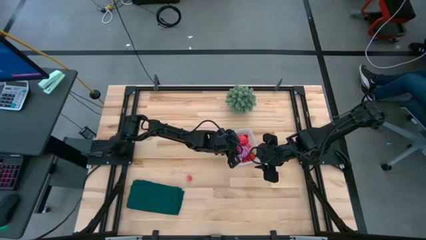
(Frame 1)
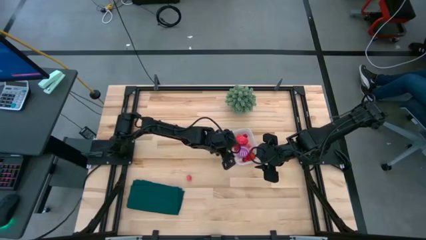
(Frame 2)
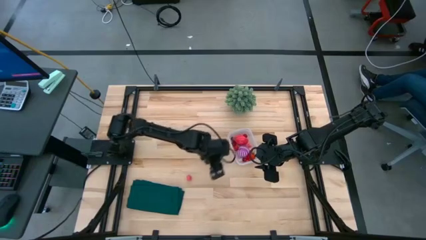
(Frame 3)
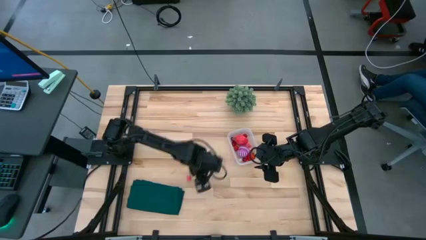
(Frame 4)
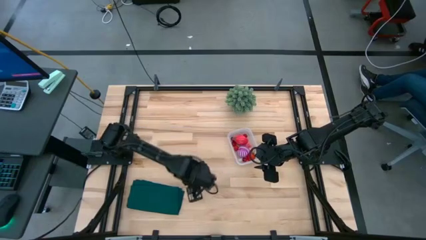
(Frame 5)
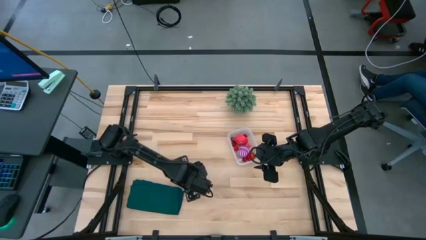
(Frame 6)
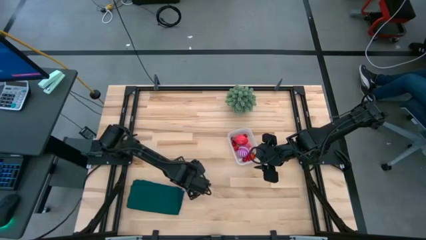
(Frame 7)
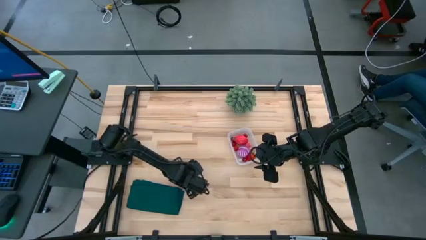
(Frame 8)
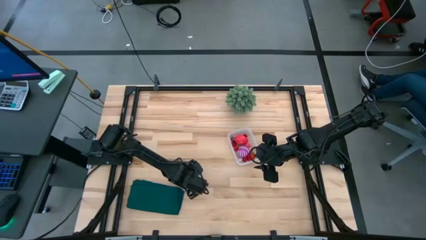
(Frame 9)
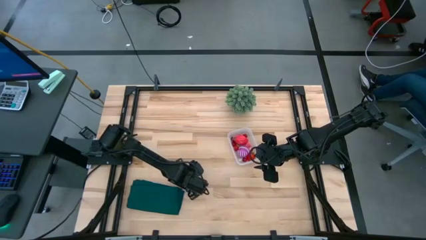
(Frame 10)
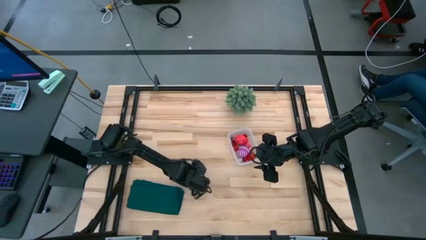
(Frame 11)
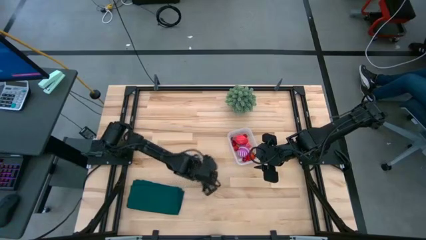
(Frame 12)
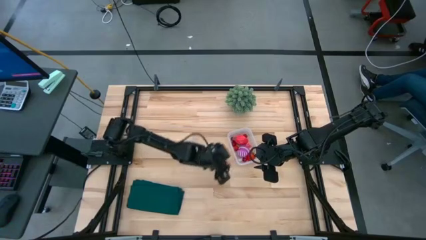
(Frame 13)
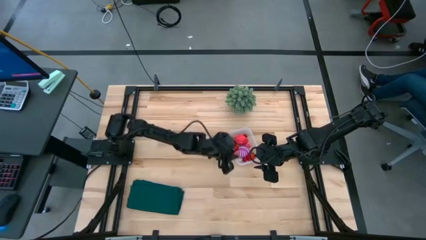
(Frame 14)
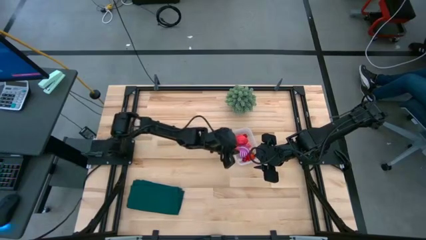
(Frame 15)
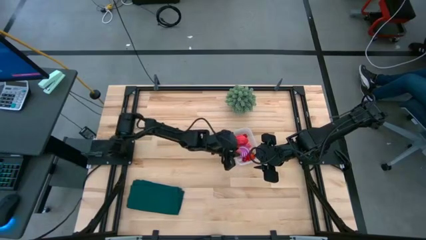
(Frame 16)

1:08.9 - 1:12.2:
Task: Pick and placing Produce into tupperware
Put the pink peach into the transparent bin

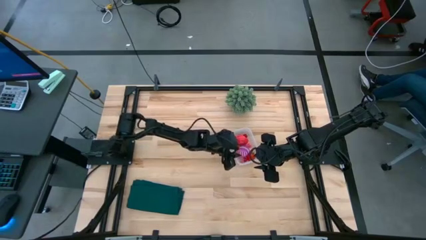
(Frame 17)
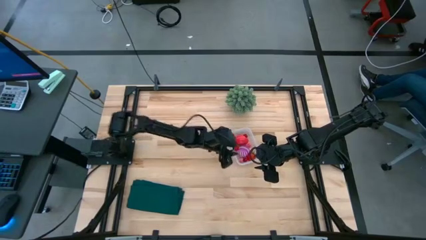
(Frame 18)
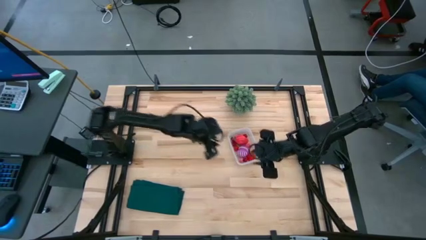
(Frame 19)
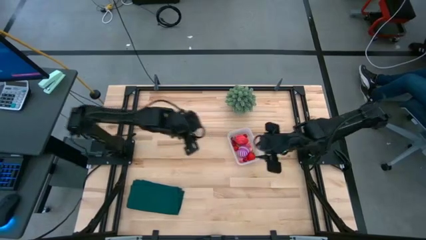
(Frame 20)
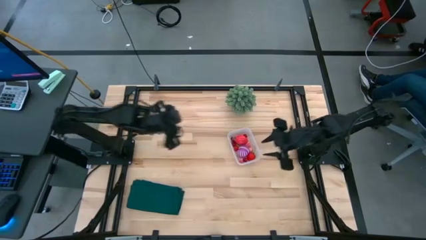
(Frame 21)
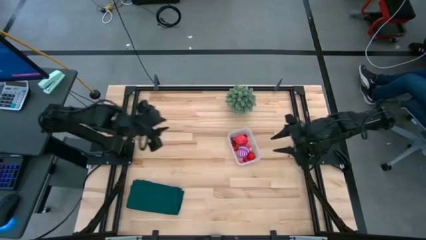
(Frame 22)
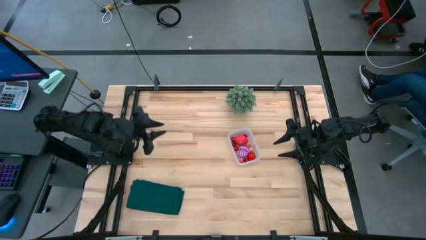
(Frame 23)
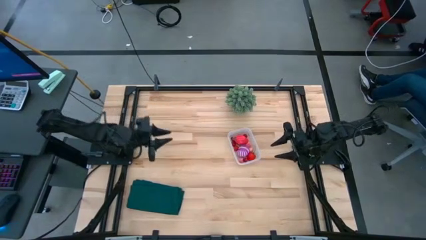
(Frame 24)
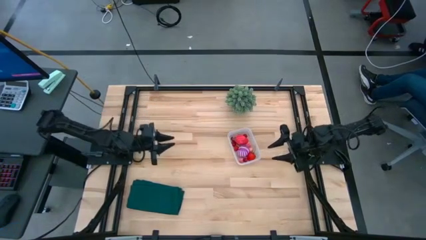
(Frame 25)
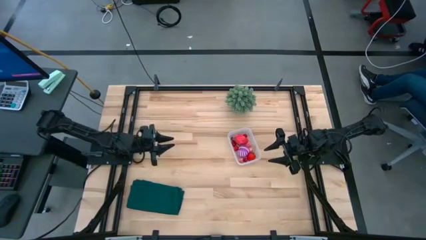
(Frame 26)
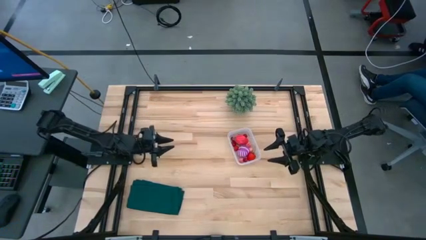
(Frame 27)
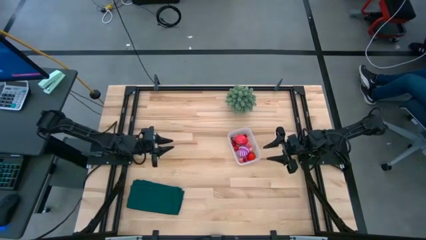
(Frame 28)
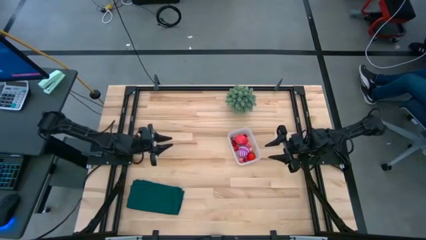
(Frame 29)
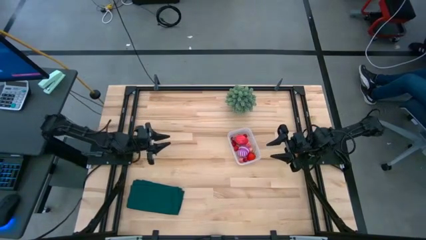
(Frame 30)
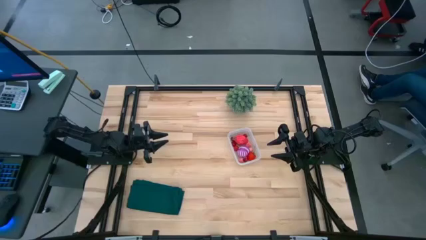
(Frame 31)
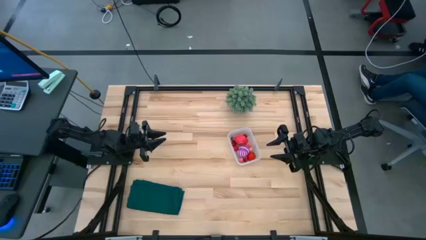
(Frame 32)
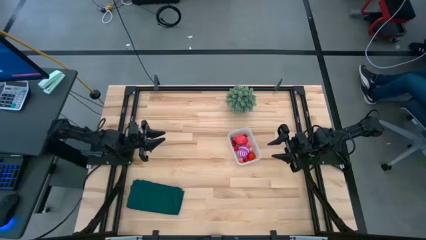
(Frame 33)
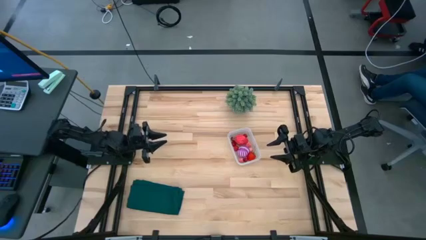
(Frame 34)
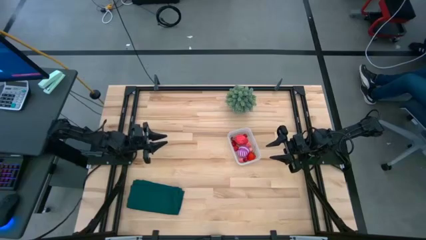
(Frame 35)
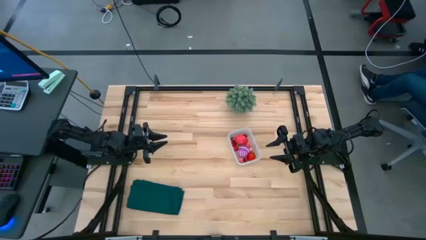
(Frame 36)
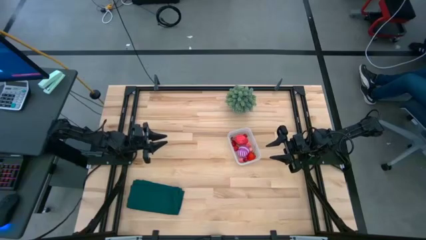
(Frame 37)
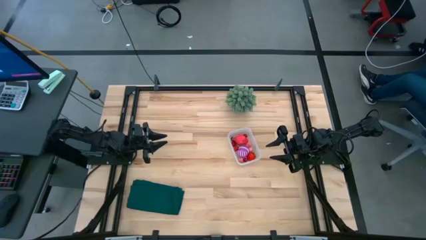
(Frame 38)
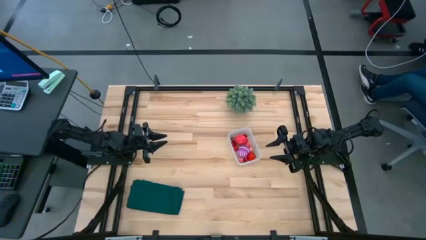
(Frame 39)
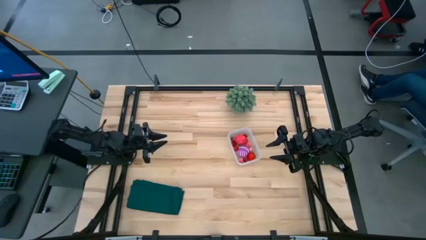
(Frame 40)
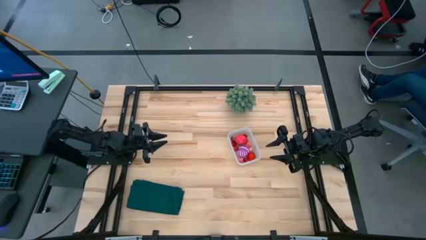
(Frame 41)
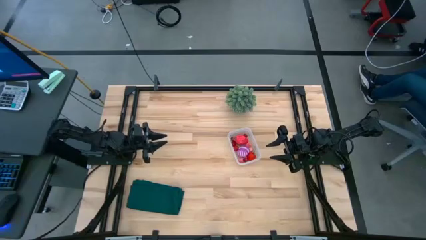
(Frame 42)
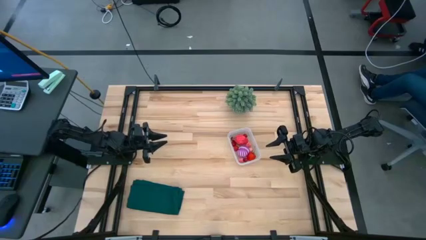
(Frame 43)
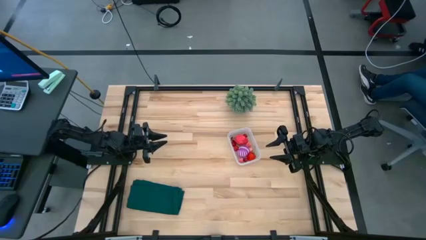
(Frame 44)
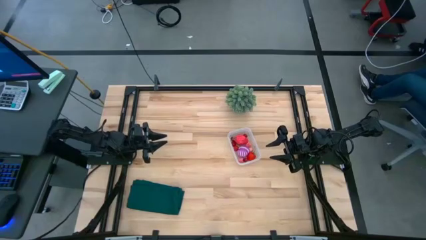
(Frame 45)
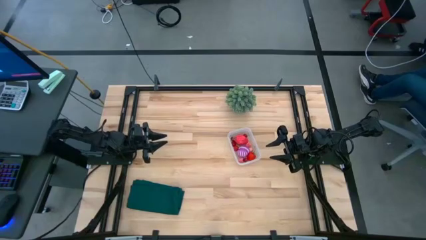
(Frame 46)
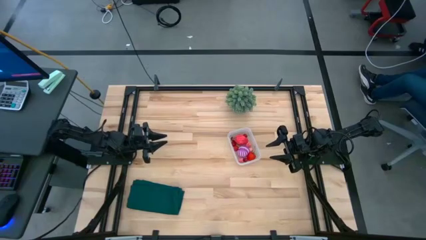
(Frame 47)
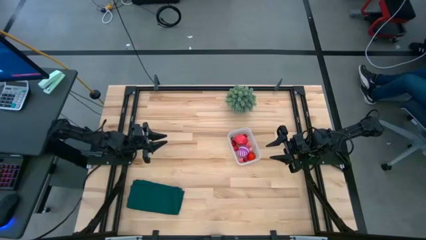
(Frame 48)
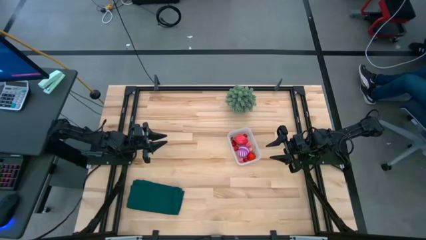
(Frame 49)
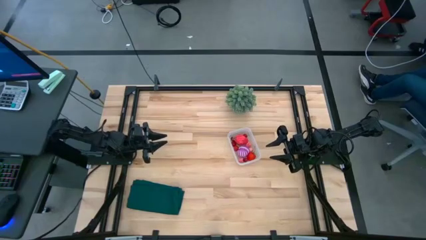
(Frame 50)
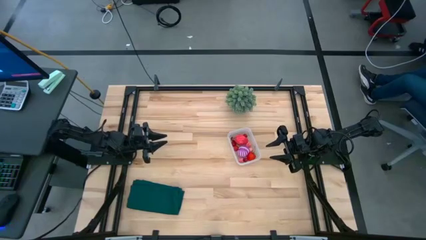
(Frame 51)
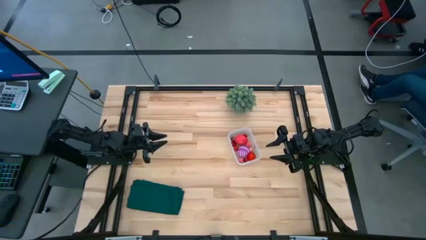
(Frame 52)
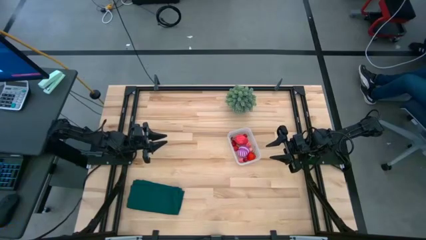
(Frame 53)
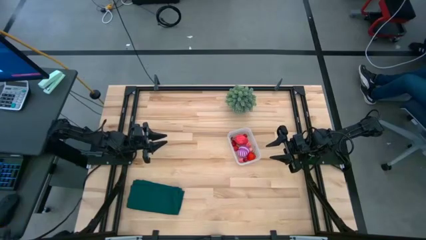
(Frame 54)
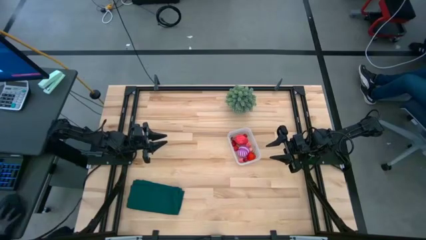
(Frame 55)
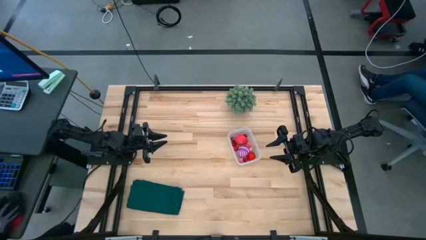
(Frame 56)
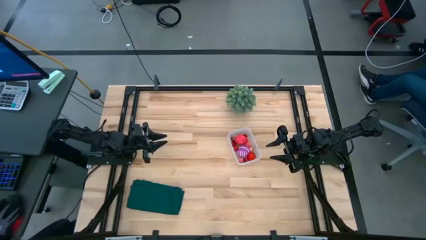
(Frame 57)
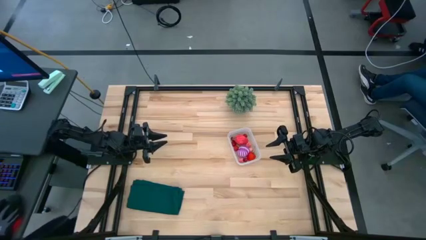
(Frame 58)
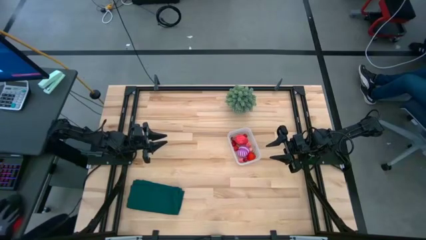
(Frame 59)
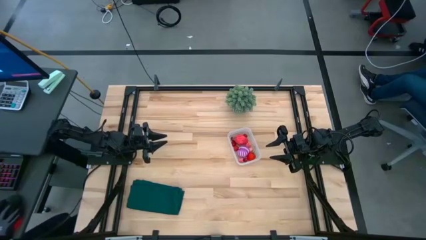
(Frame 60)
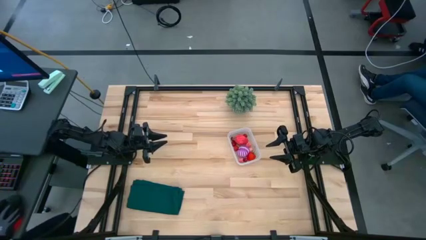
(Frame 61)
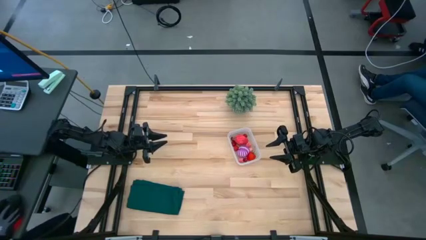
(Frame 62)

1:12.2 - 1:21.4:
Return to Home Position

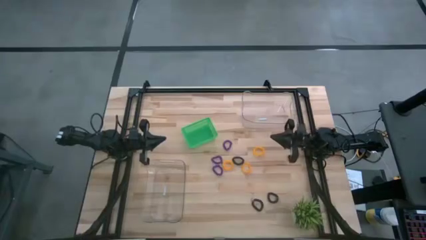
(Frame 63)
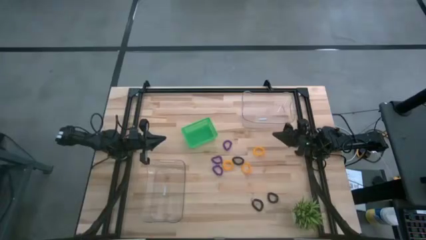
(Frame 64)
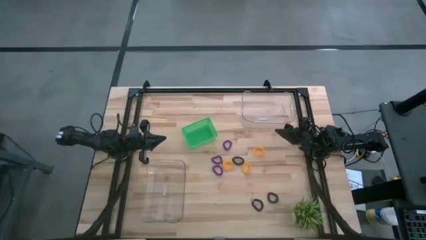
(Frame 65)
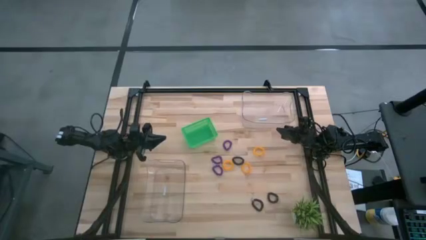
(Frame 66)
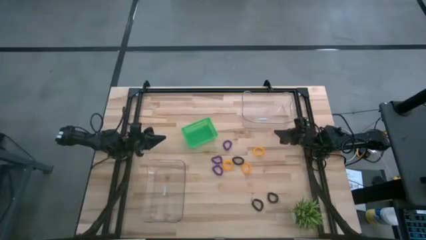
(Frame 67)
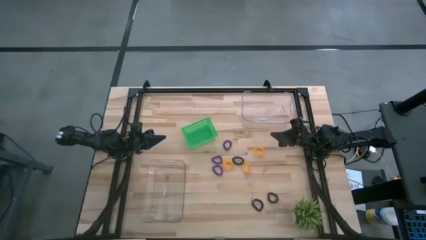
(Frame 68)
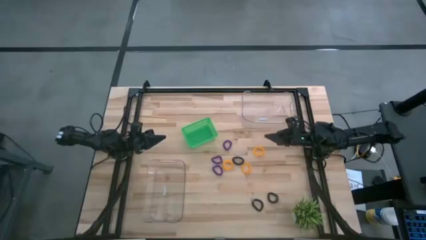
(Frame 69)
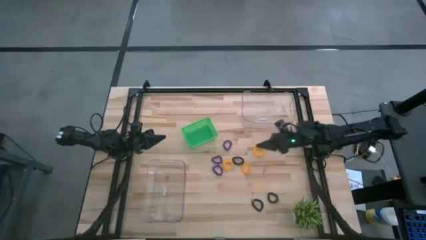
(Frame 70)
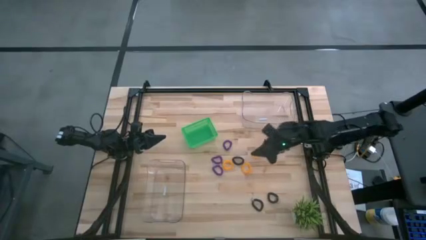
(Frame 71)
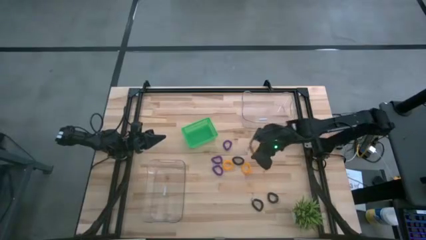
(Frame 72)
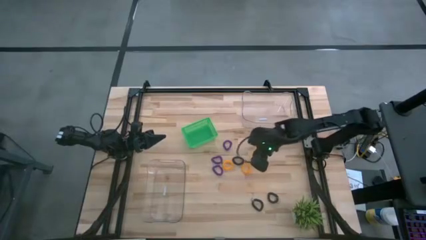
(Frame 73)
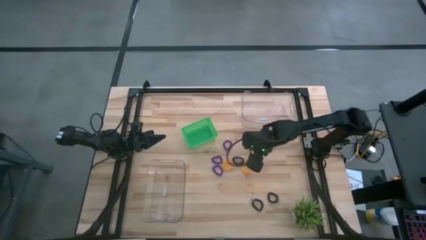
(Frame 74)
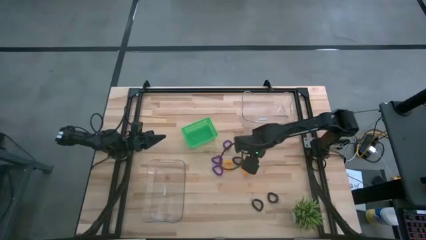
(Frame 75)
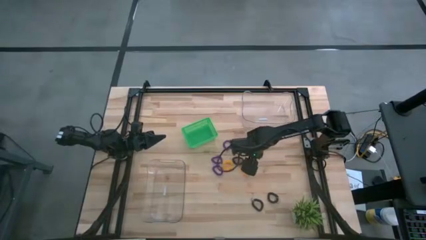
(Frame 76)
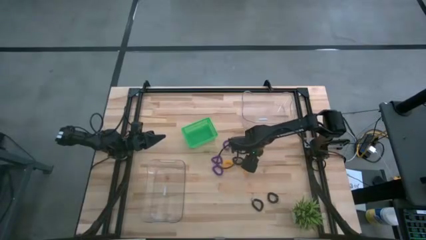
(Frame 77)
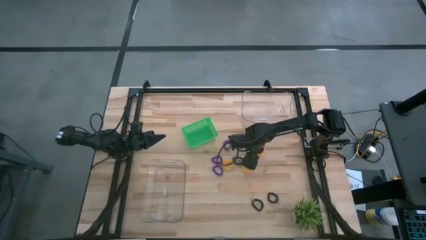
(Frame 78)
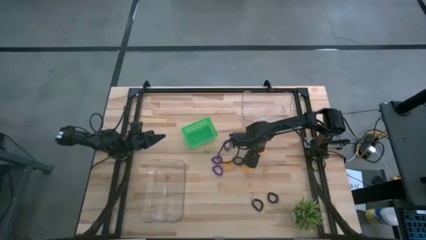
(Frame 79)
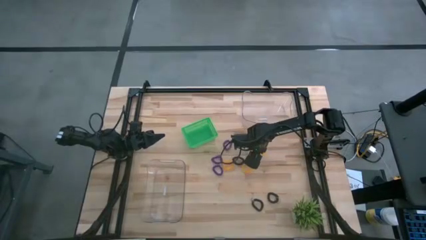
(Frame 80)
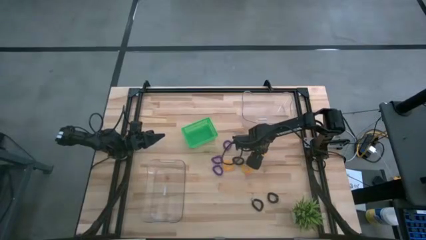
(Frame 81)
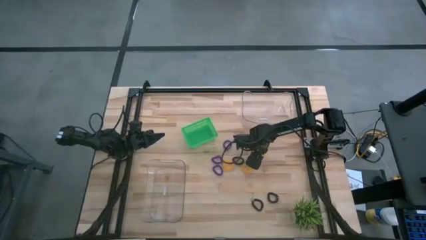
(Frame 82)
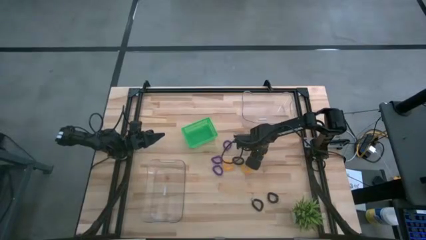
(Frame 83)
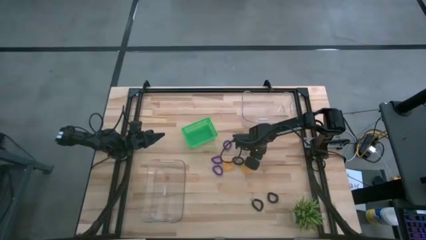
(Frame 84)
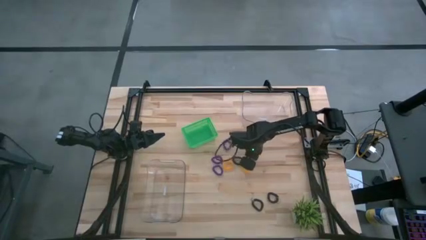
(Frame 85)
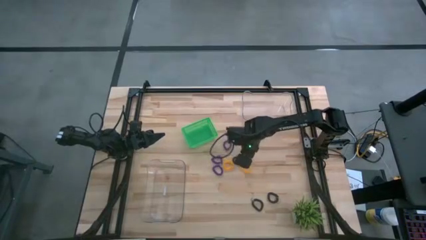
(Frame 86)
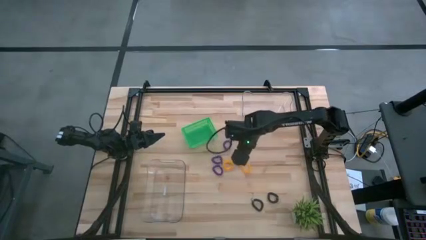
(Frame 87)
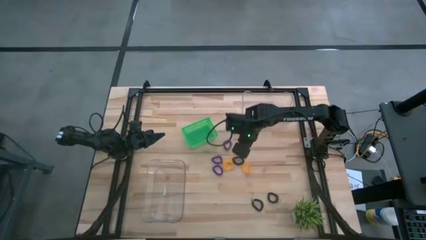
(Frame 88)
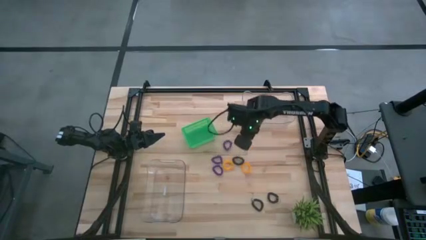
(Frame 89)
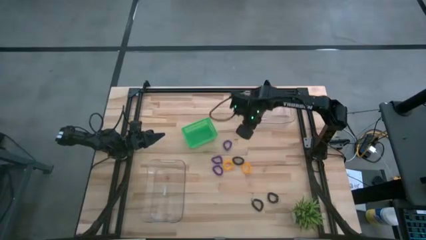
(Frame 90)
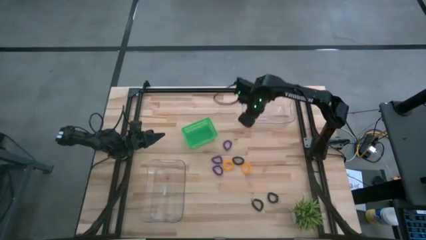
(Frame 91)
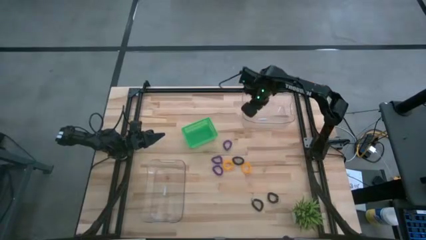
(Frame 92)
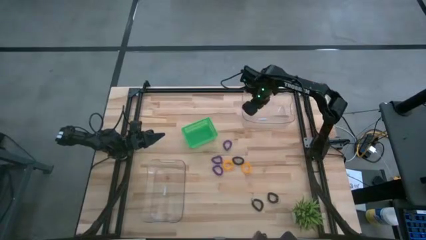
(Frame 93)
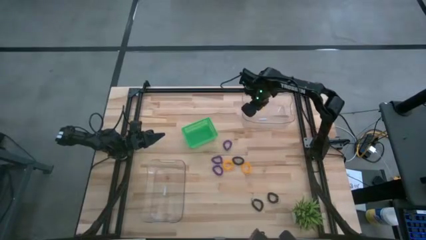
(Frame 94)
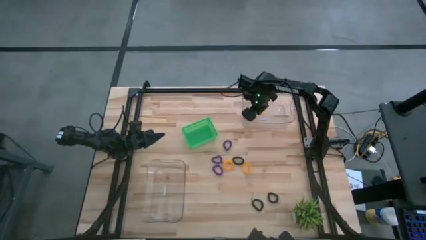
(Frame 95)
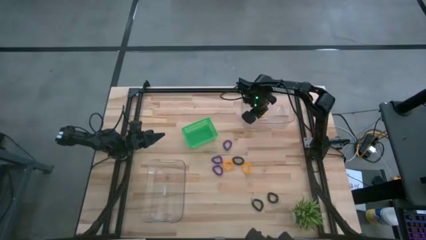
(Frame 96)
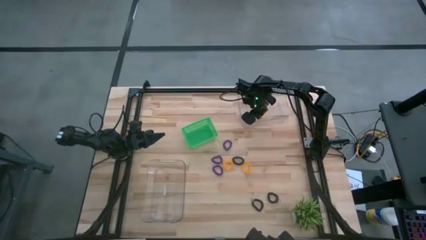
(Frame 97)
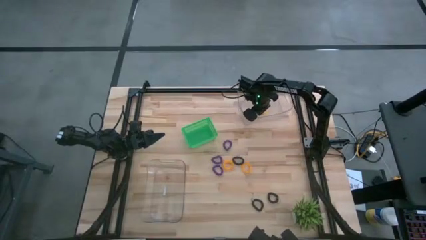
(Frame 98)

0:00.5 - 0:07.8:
Task: Sort spring keychains
Put the top yellow spring keychain into the top transparent bin
